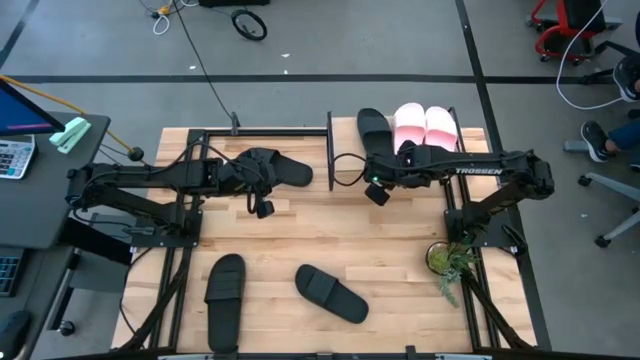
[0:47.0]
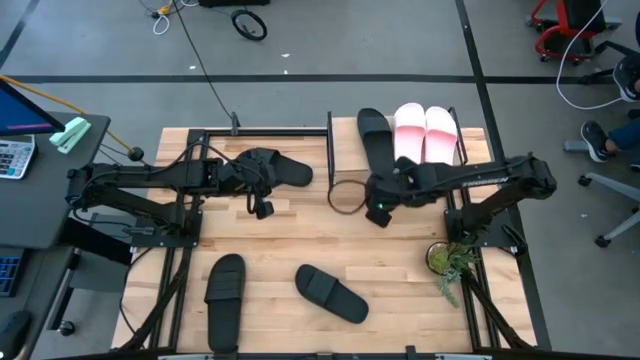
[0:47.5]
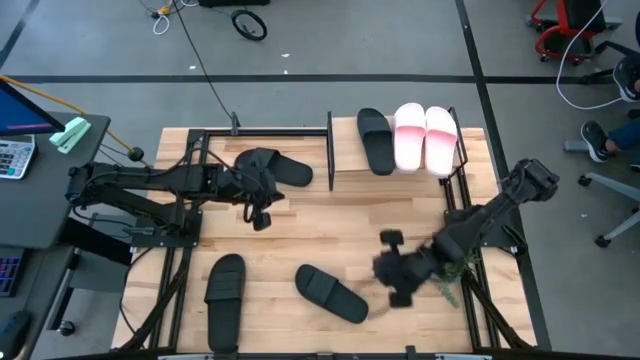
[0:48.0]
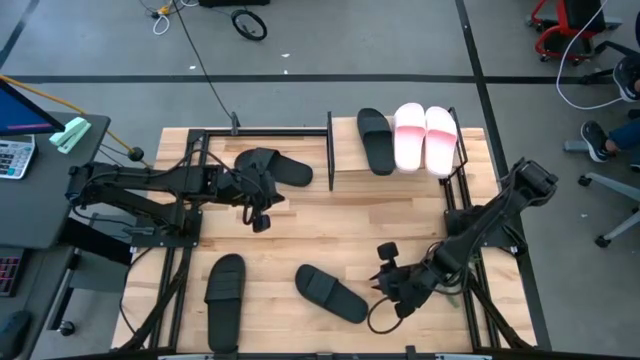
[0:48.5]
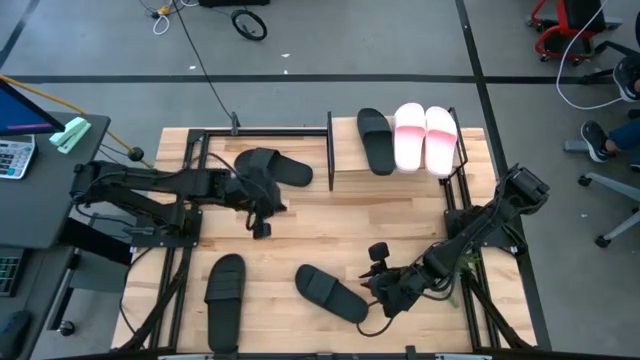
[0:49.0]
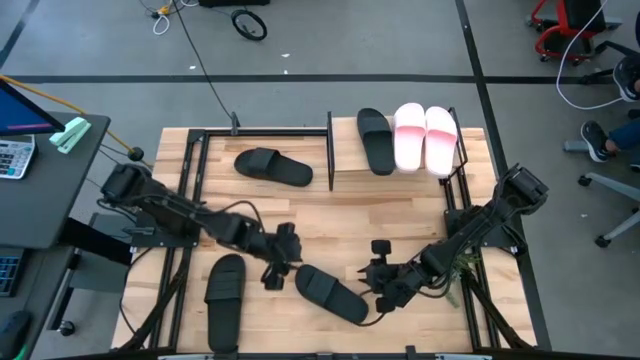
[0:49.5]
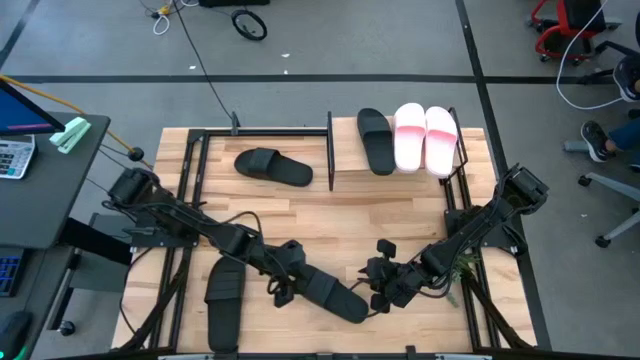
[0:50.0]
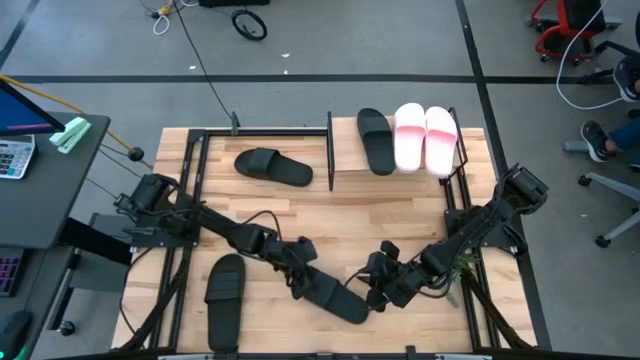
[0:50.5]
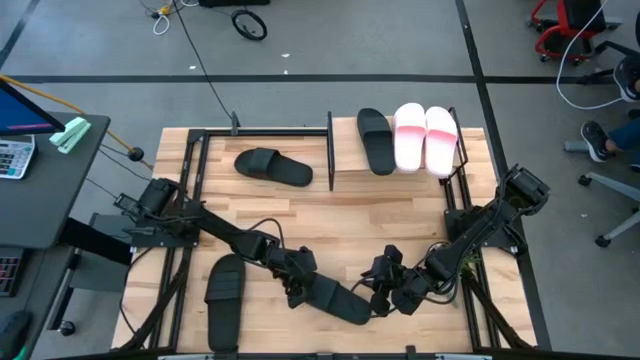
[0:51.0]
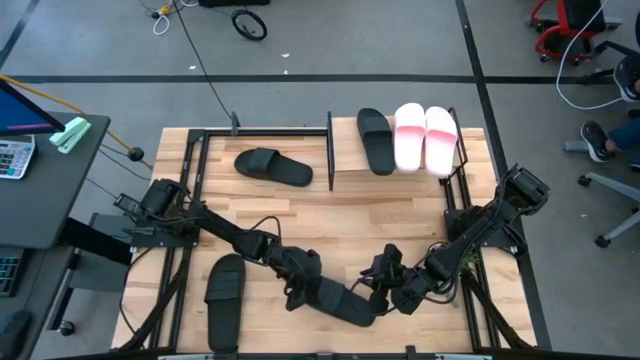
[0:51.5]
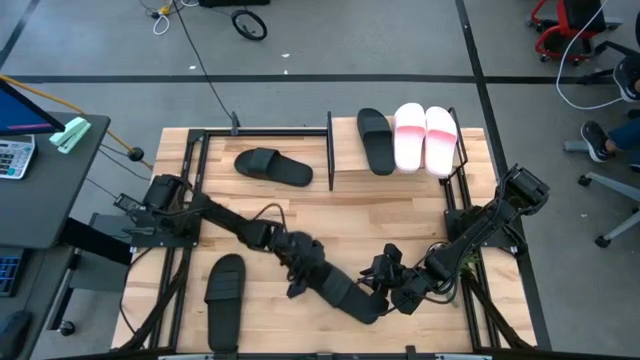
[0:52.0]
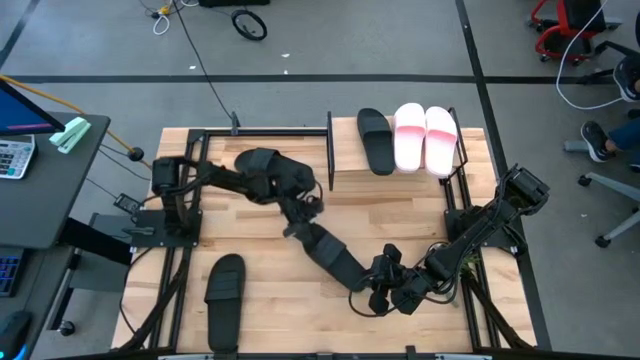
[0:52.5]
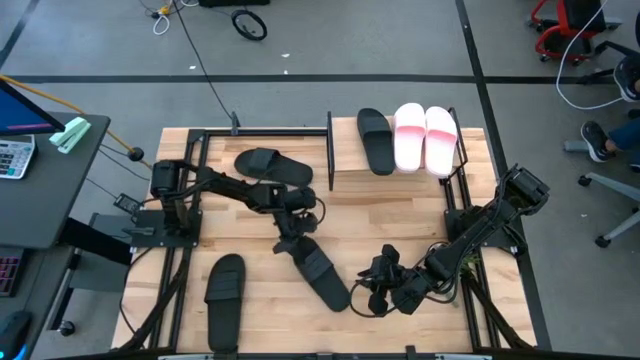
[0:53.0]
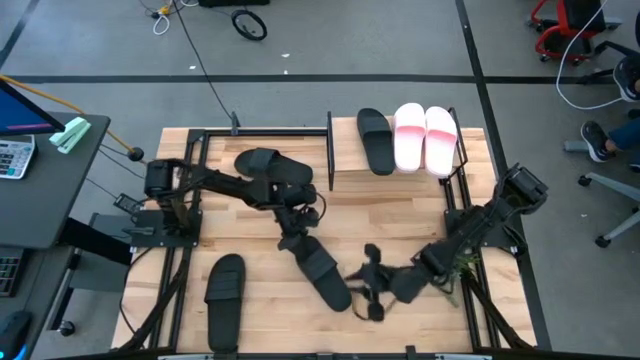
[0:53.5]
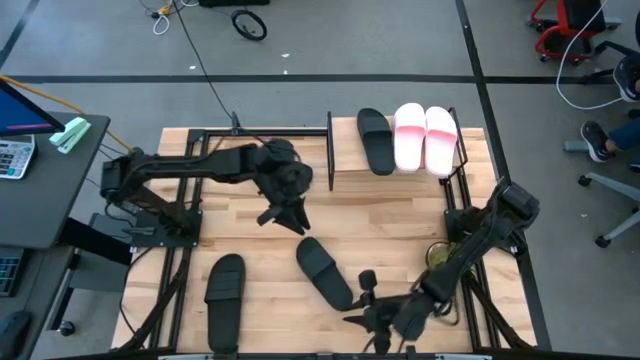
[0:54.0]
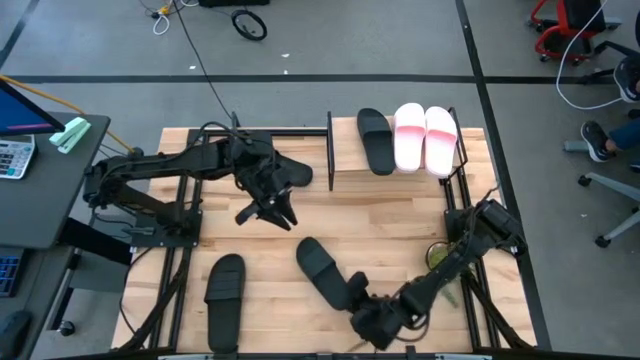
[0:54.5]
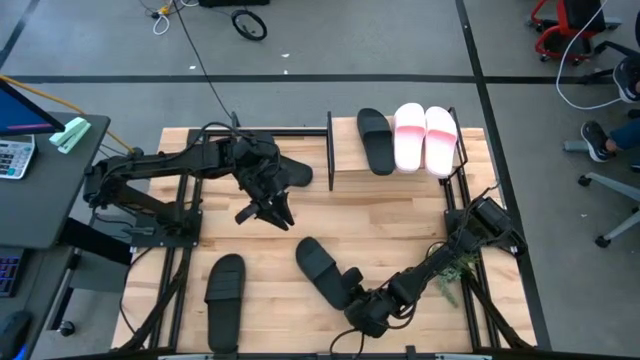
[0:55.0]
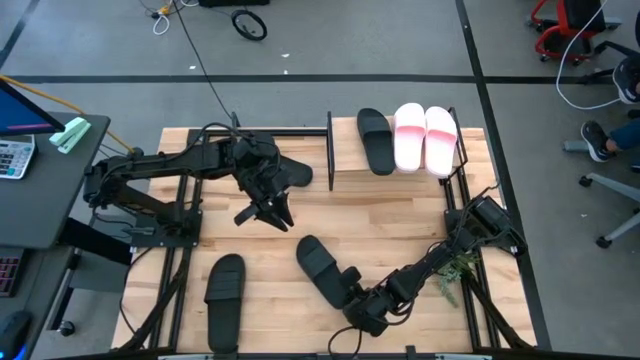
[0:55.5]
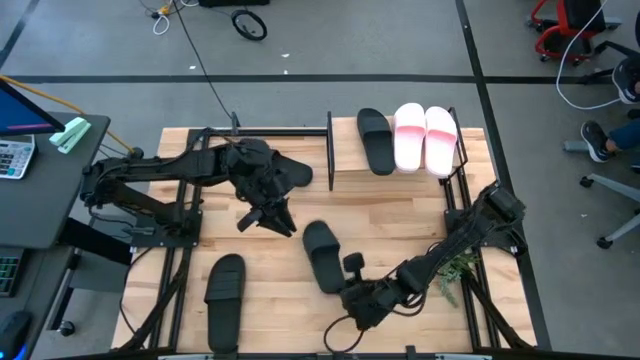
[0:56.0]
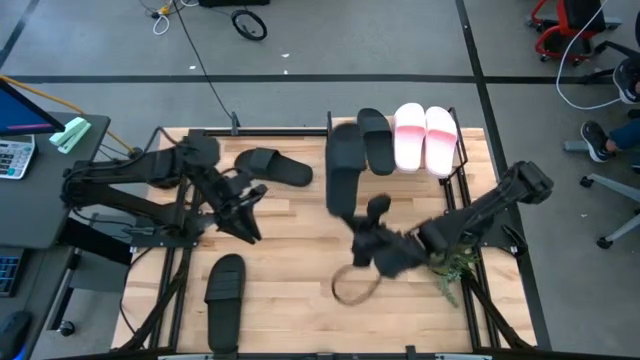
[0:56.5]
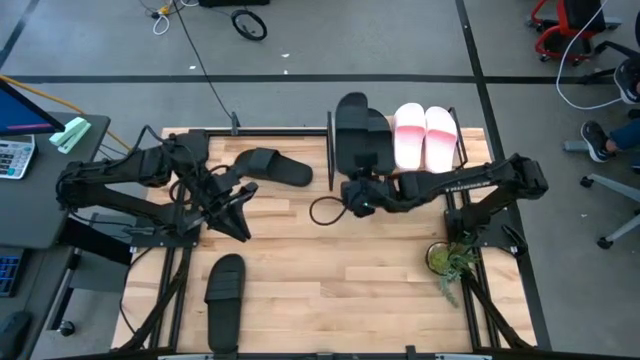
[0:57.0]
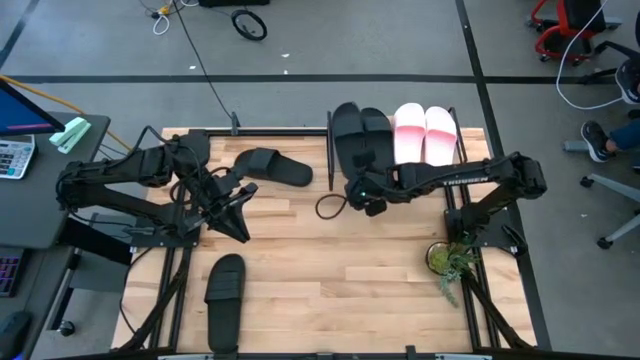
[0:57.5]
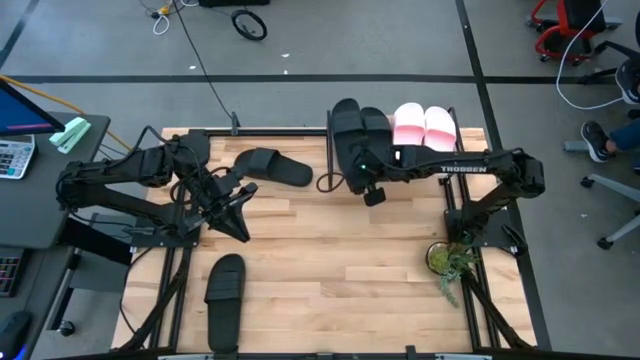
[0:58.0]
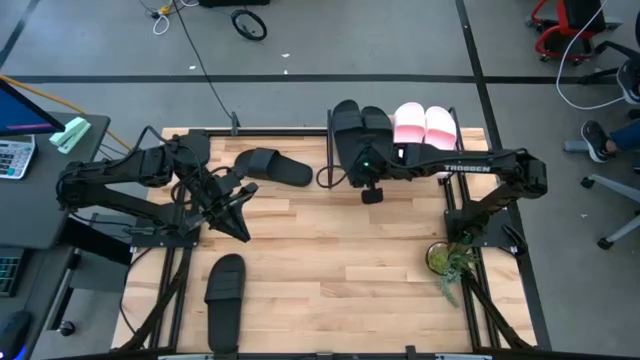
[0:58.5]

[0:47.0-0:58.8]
Task: Pick and place slides into the shelf
Put the black slide on the shelf

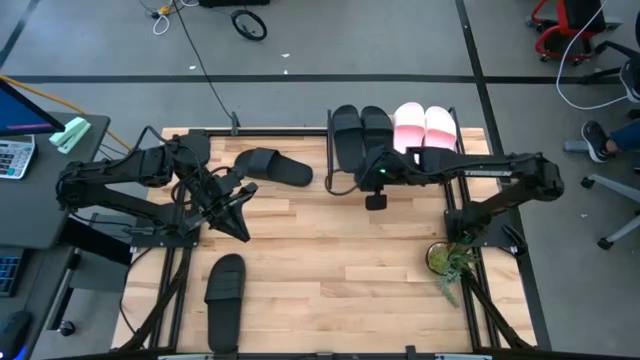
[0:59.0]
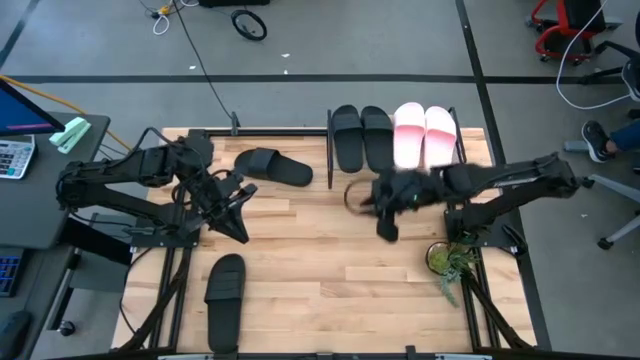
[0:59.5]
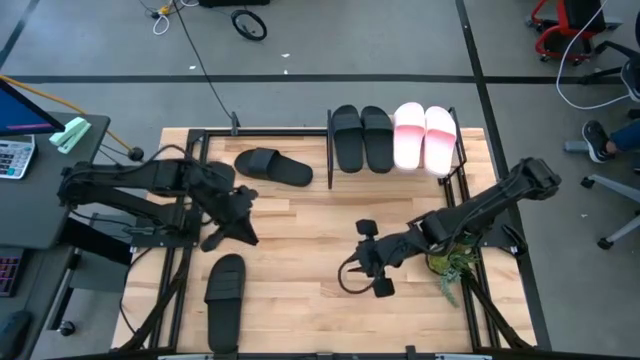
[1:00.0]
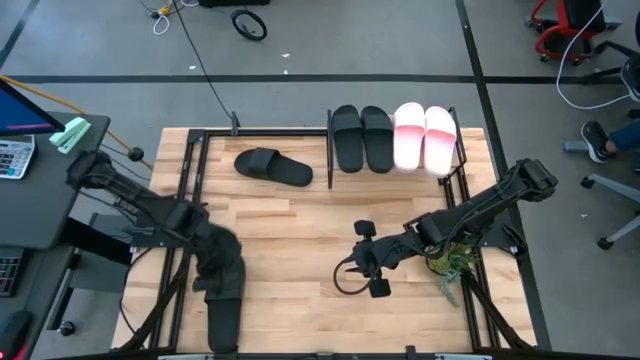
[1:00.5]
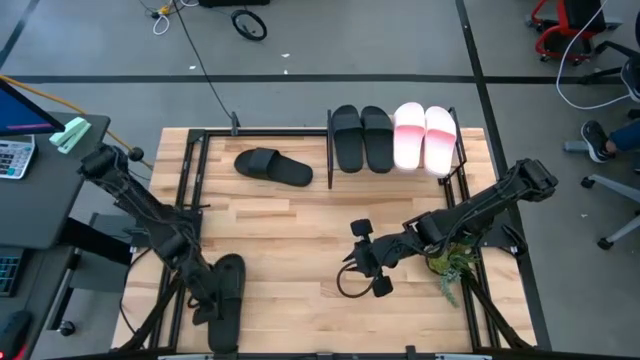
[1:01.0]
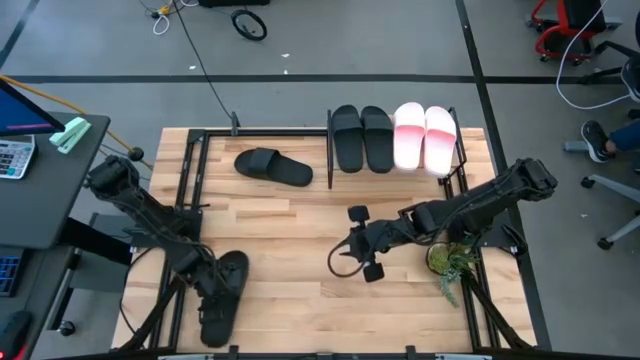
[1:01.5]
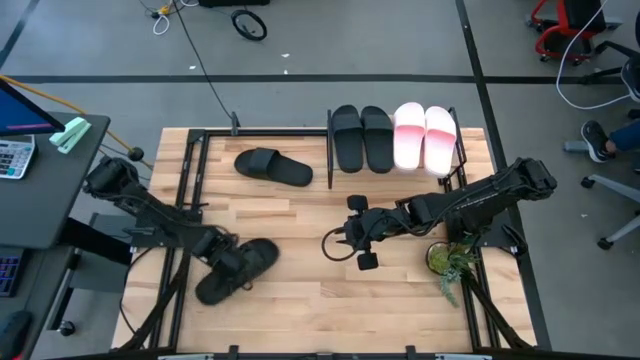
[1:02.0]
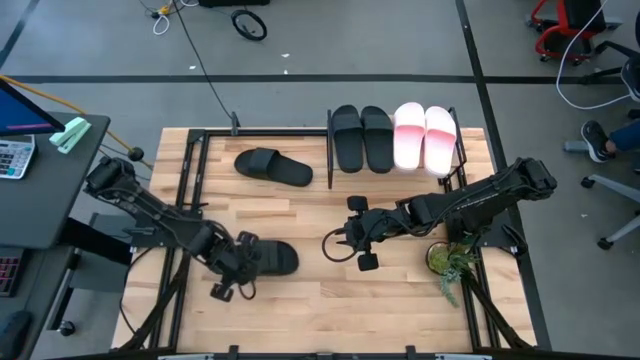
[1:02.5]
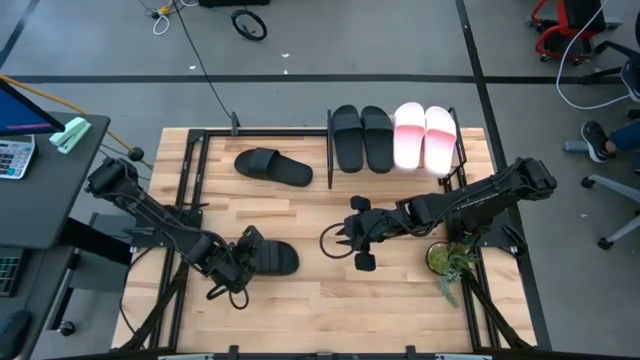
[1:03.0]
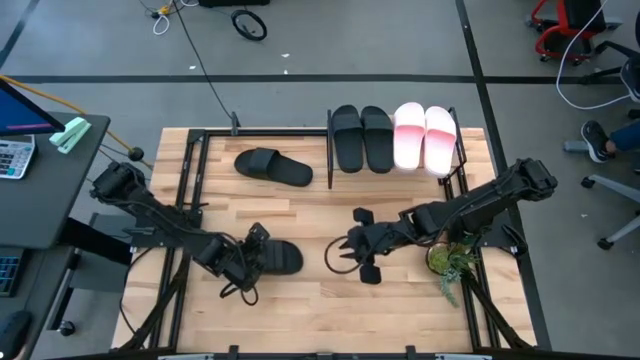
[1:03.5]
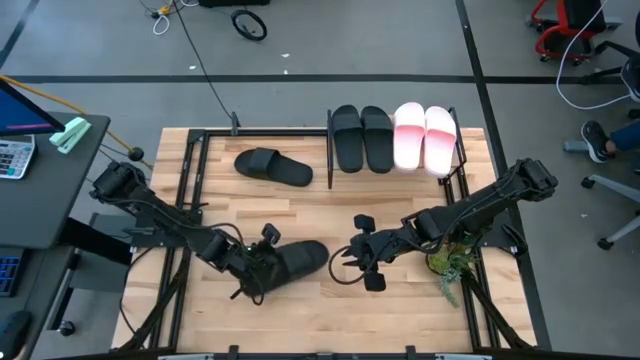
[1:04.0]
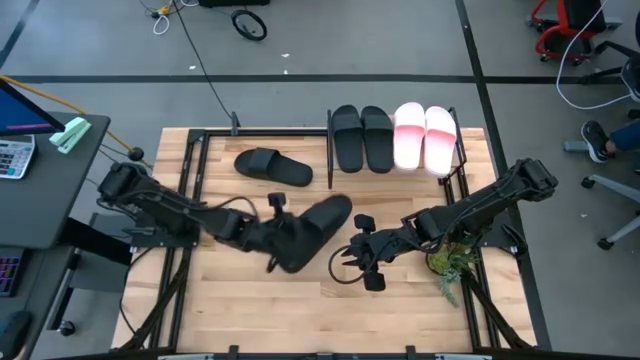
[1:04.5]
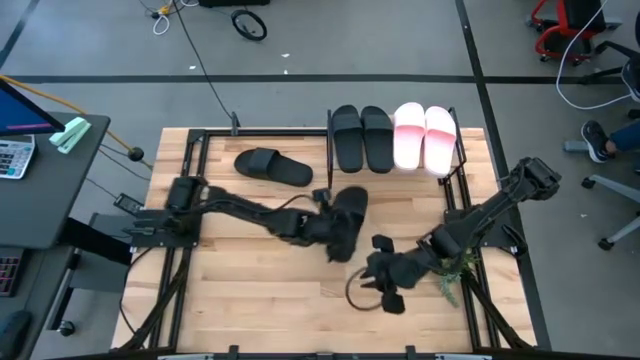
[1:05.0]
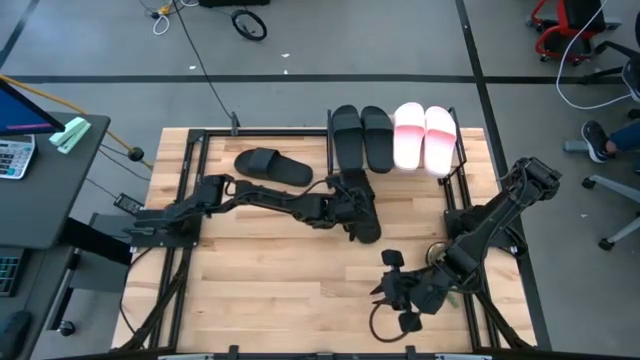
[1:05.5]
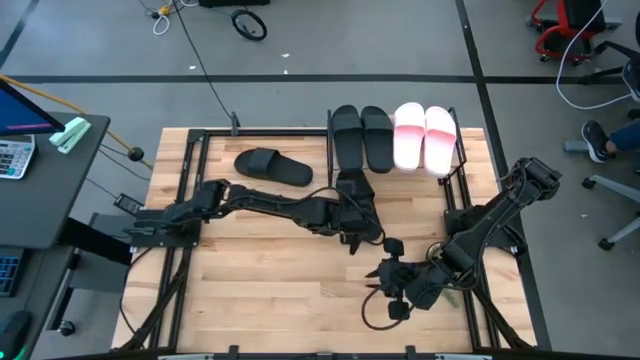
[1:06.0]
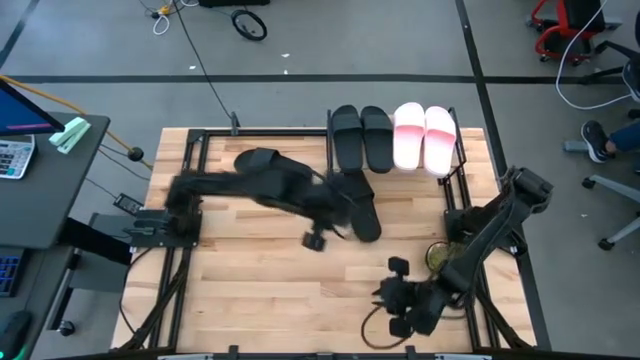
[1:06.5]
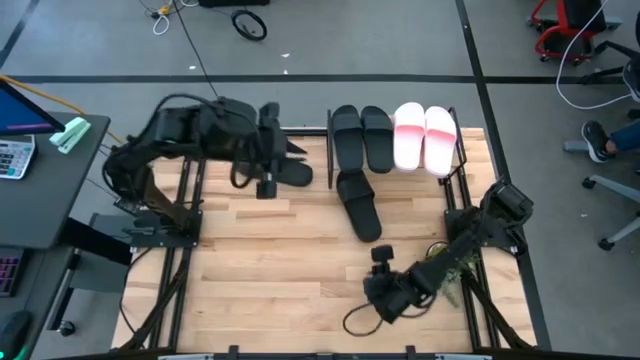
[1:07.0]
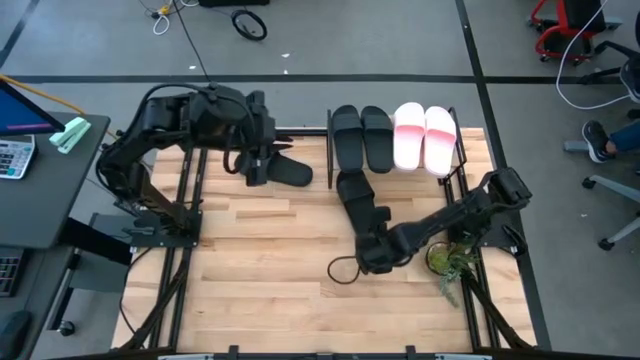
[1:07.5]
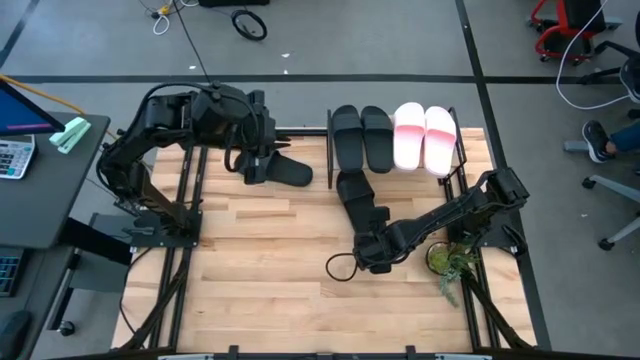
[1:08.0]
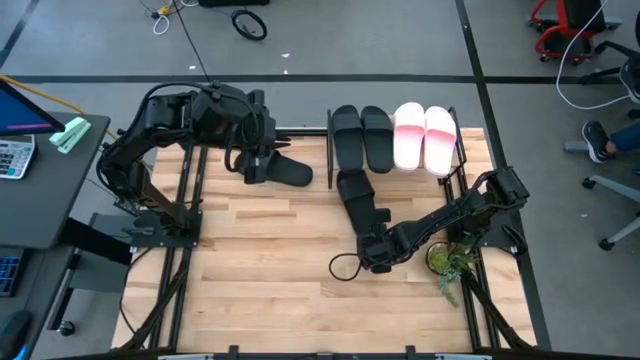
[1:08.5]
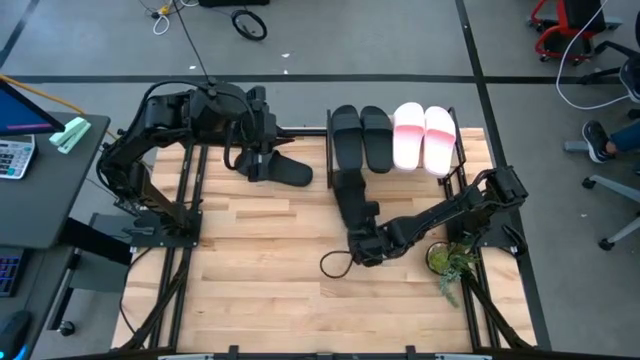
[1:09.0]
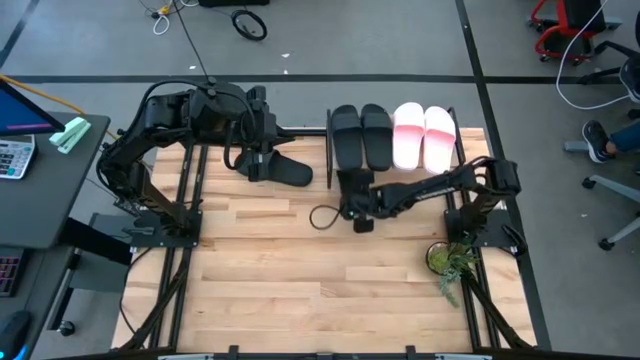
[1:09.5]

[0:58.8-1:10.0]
Put the black slide under the shelf
